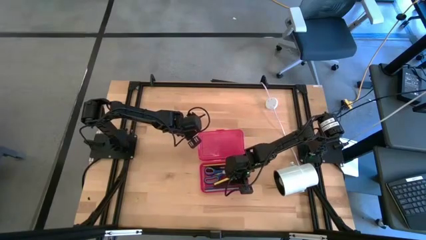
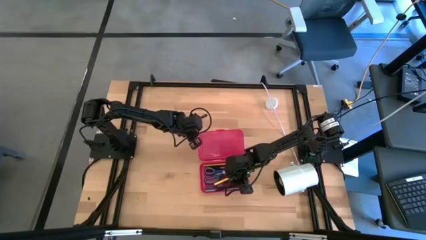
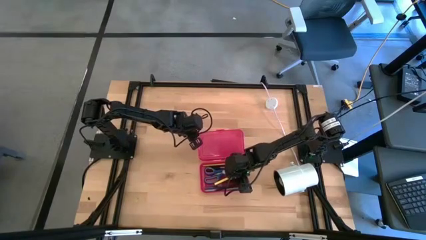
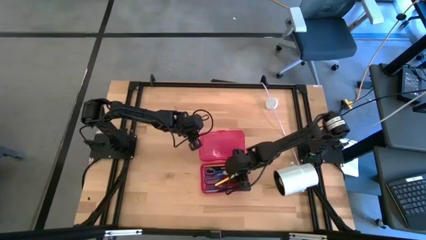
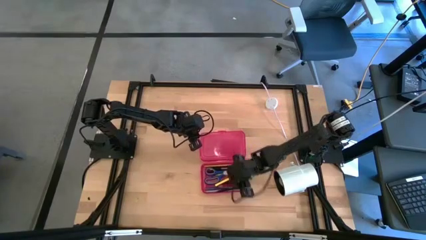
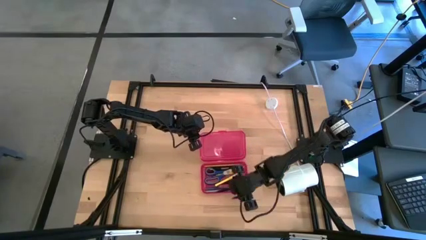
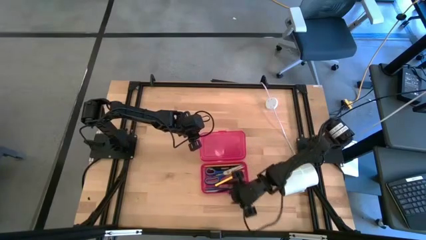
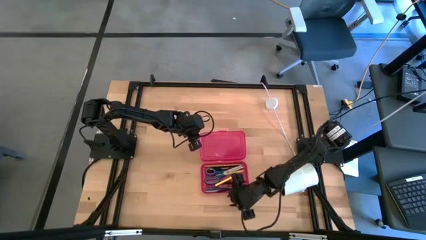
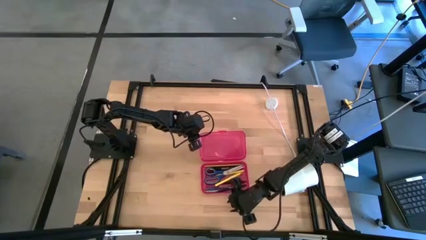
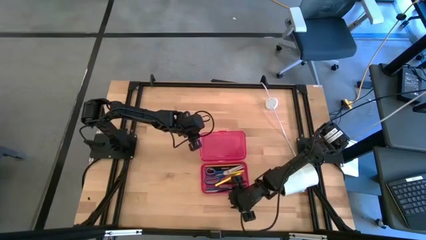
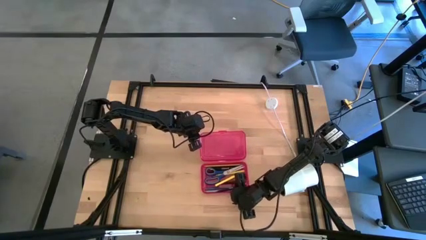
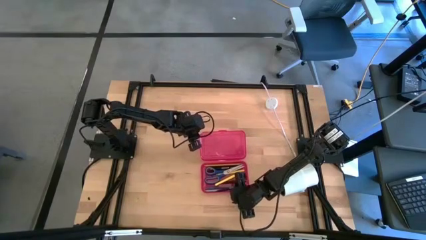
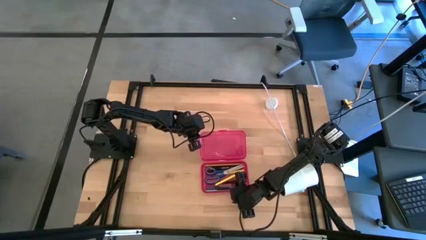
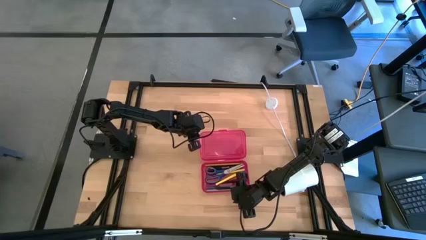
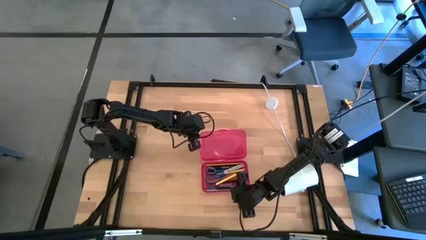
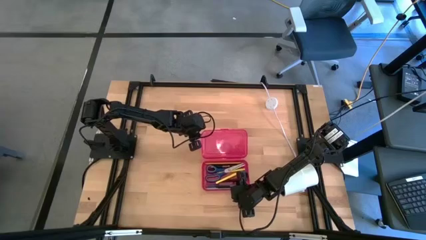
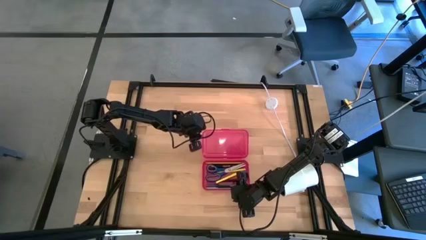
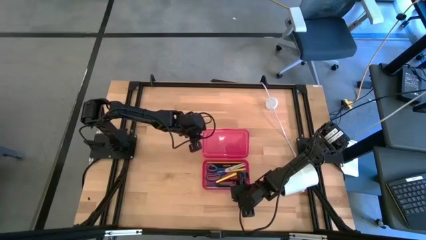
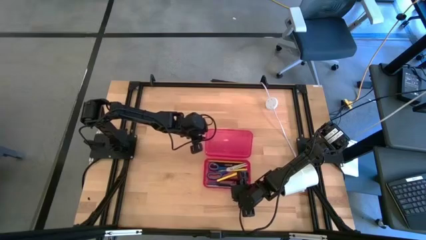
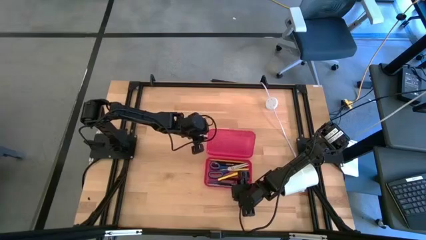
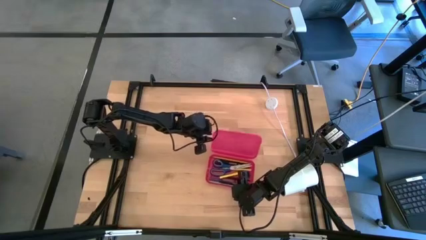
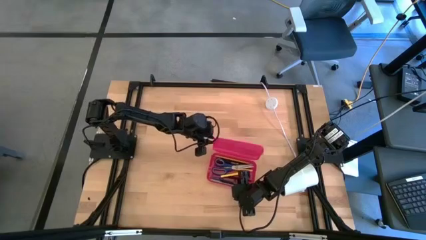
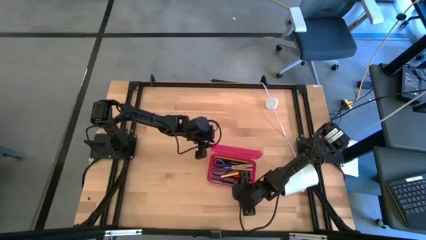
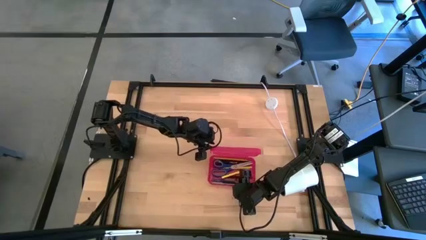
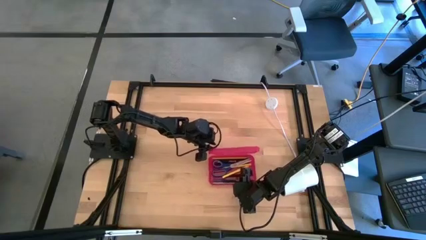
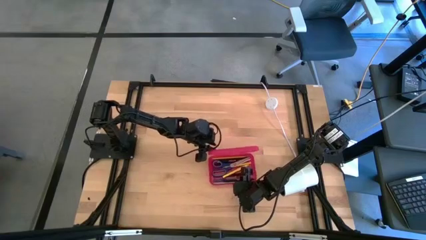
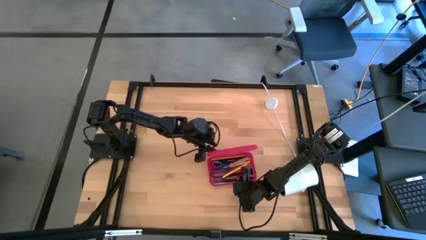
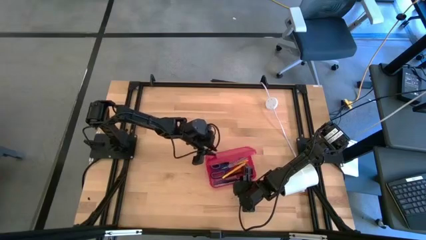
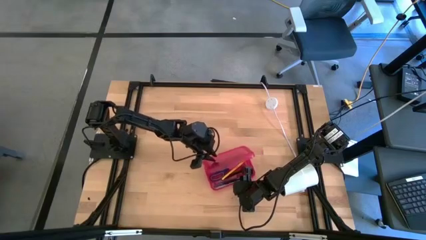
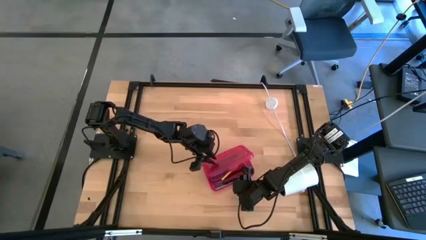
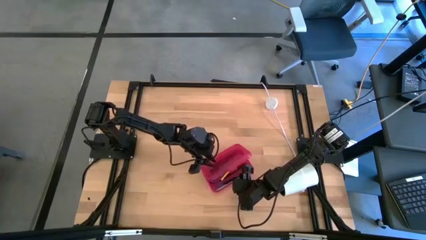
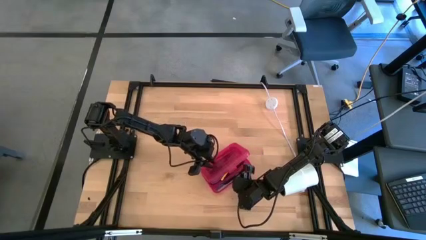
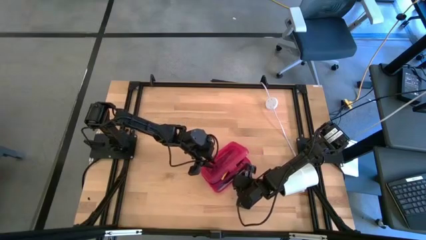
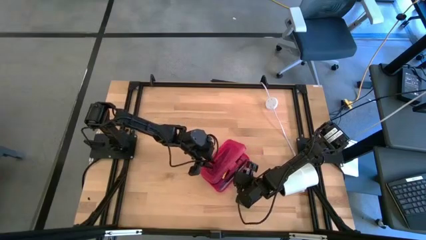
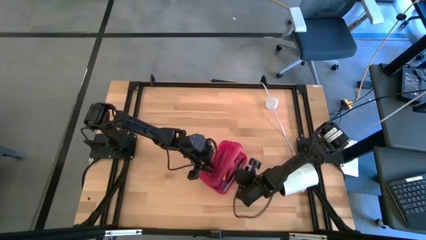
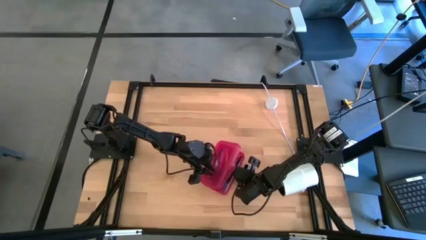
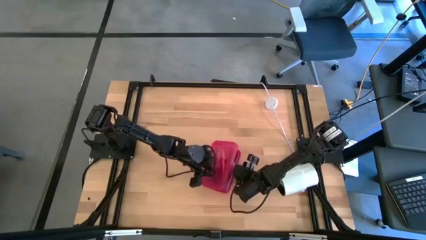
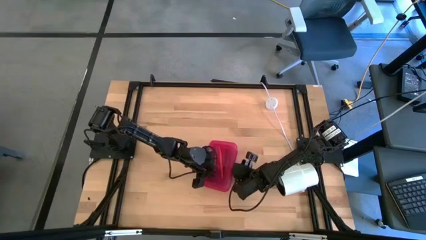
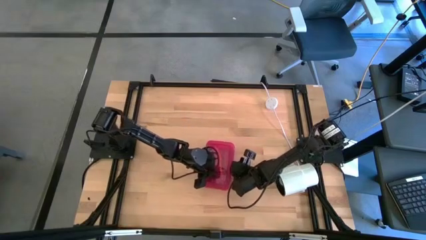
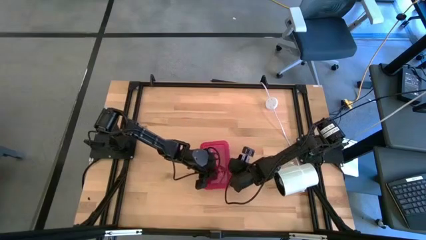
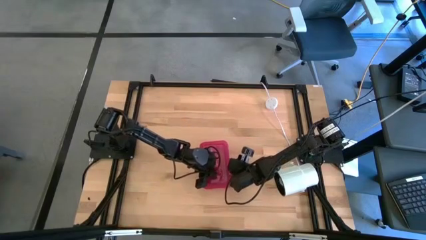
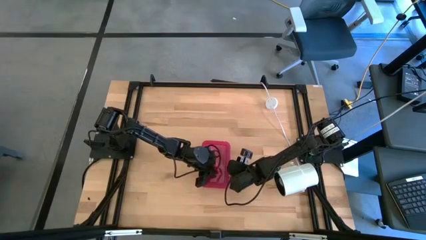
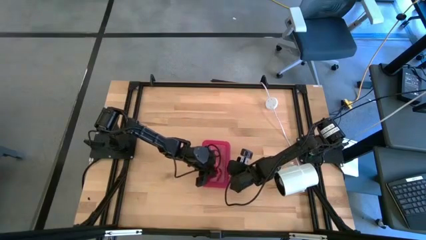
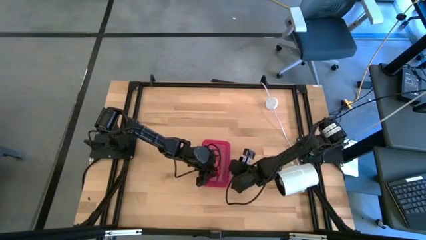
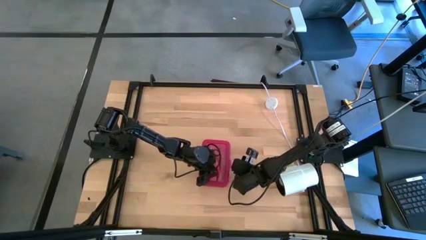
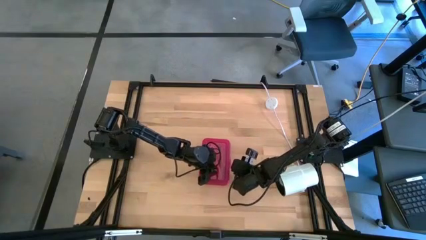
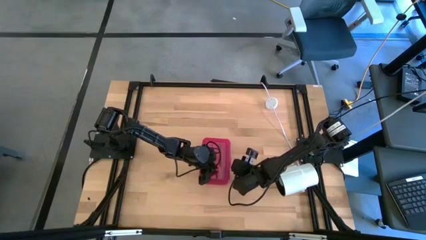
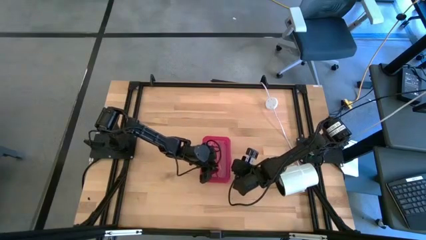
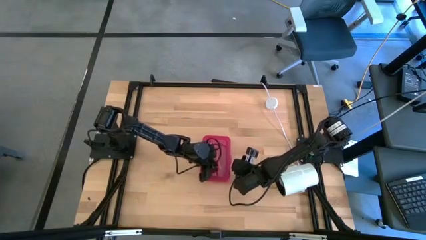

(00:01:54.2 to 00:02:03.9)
Task: Pick & place school supplies into a supply box
Close the red supply box

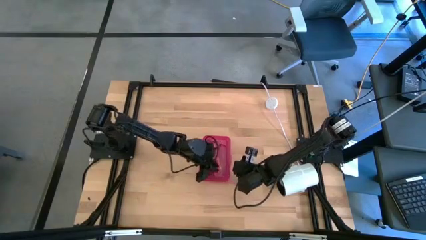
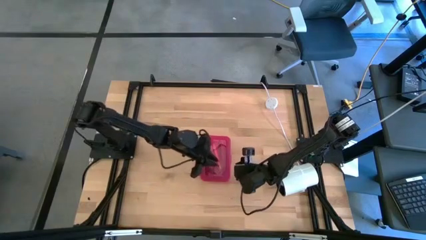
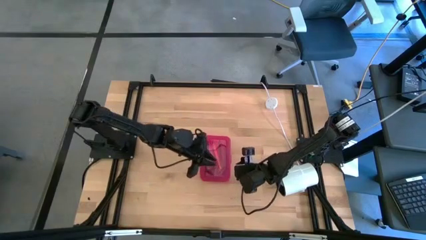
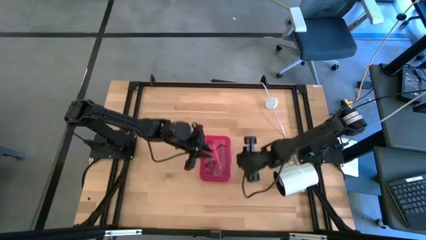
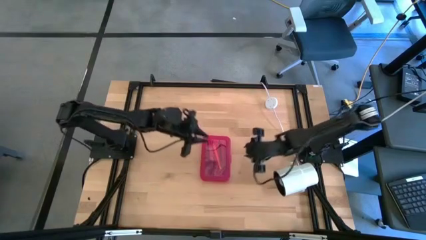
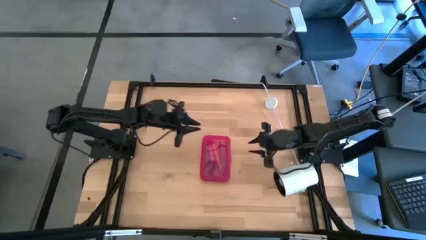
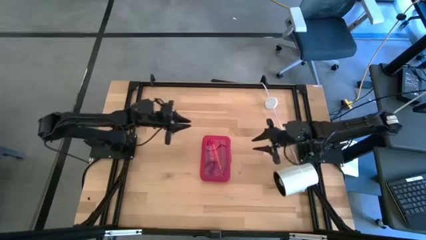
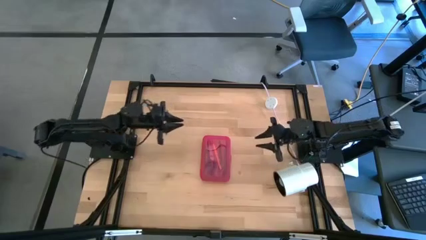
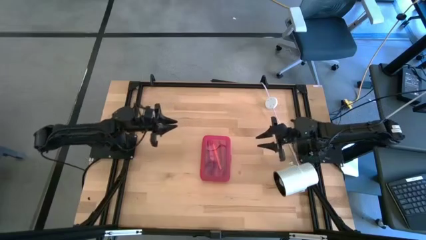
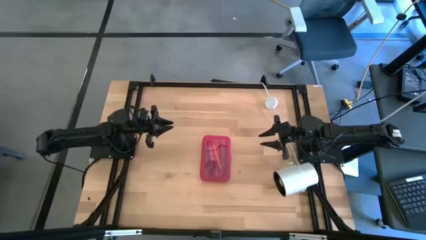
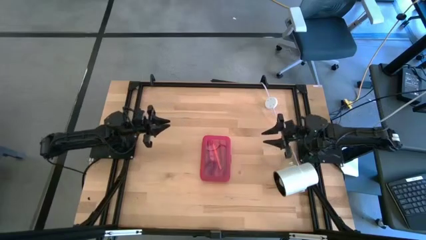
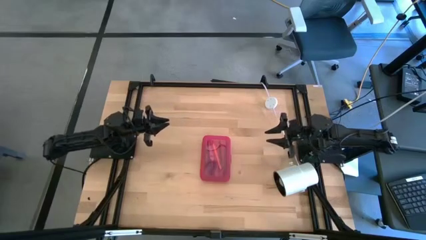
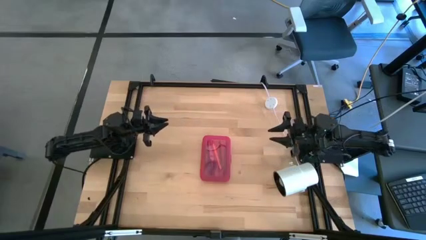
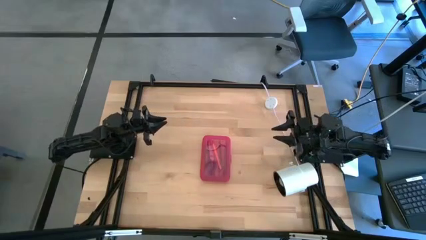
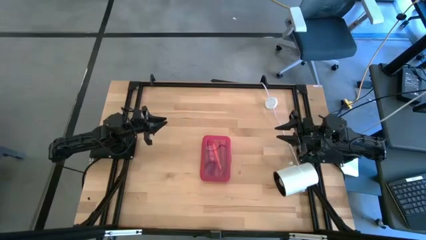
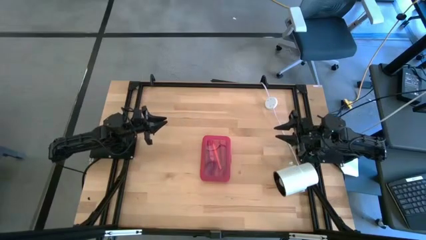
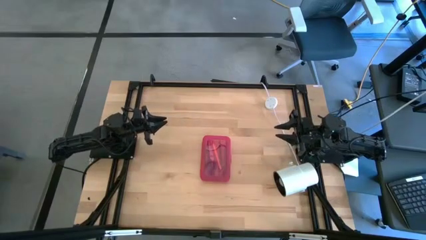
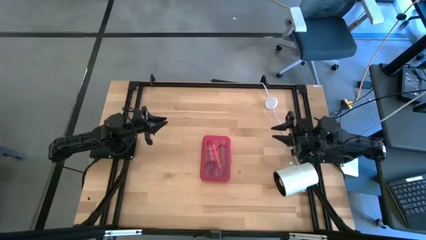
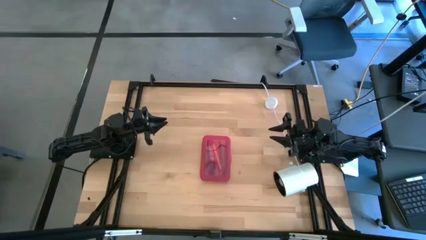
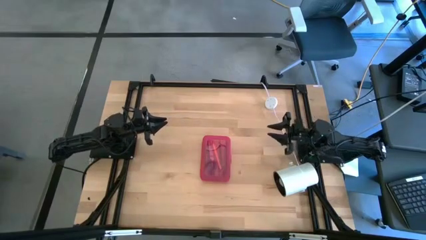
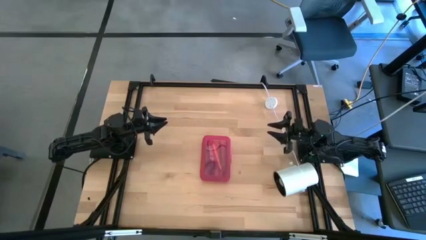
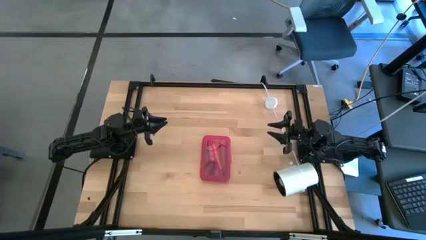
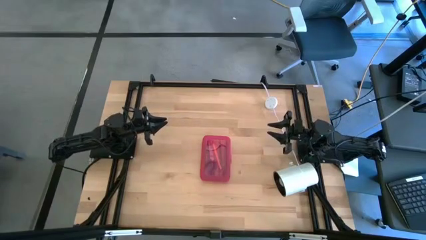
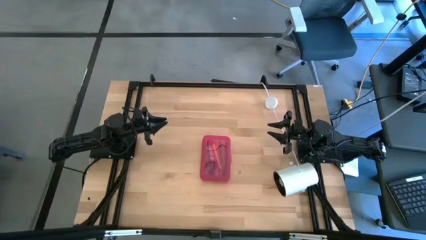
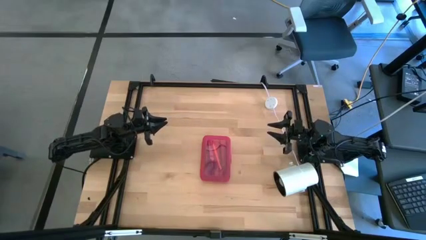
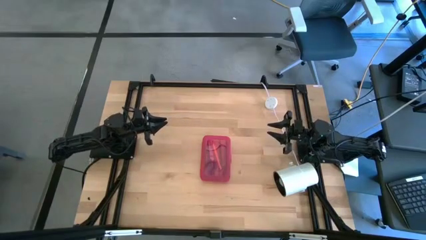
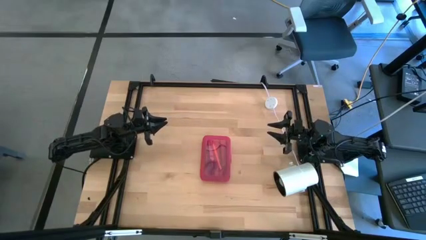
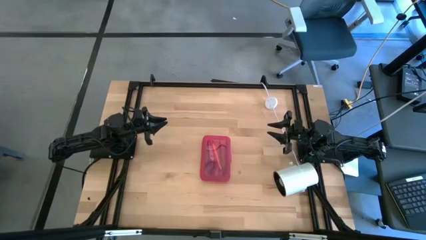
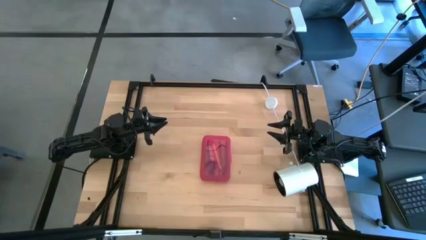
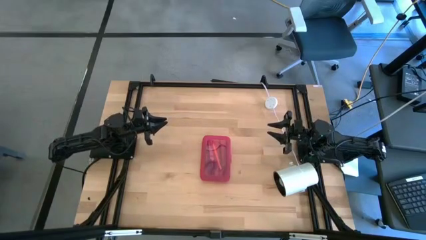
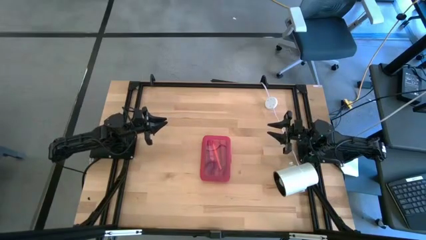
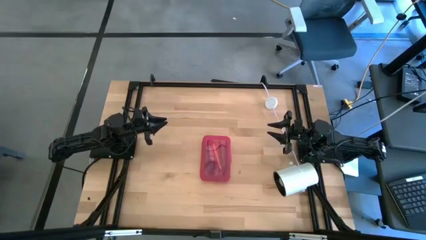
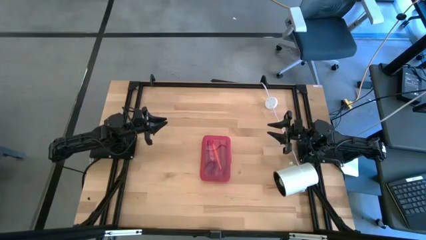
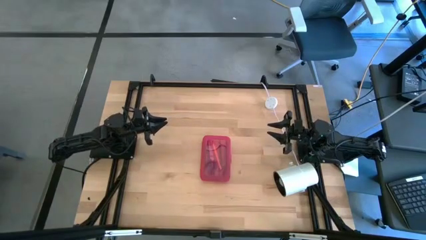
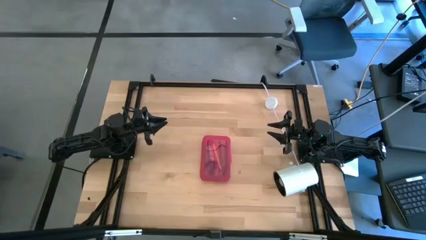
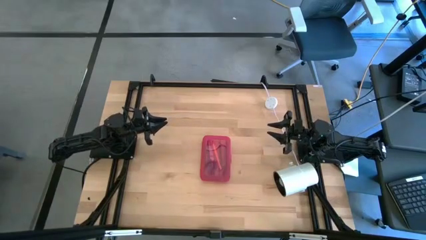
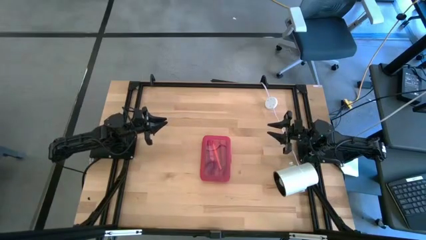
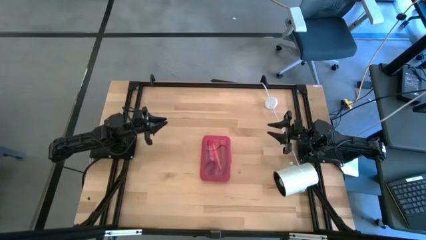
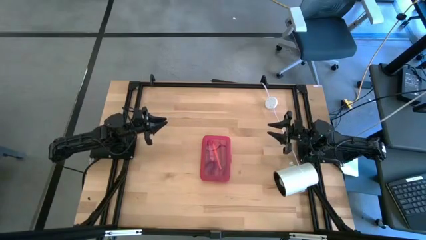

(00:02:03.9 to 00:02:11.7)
Return to Home Position
